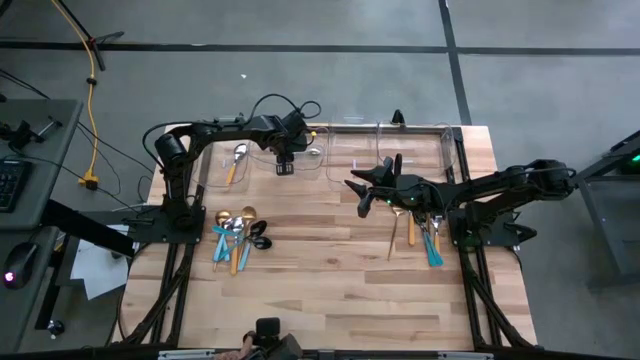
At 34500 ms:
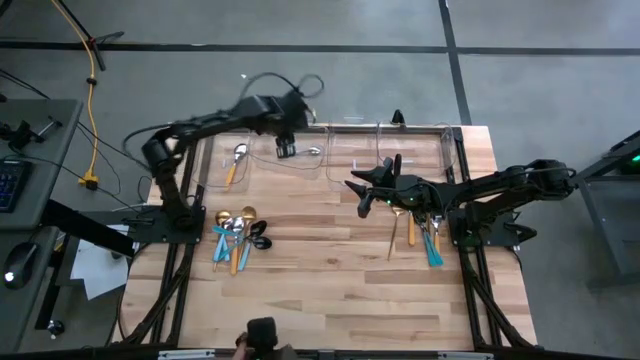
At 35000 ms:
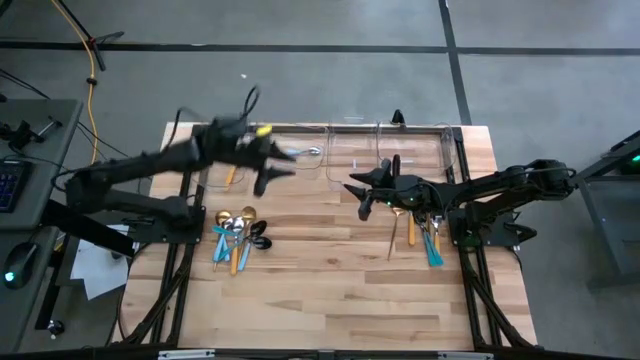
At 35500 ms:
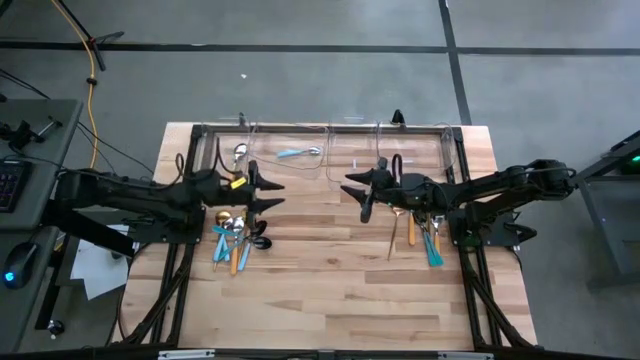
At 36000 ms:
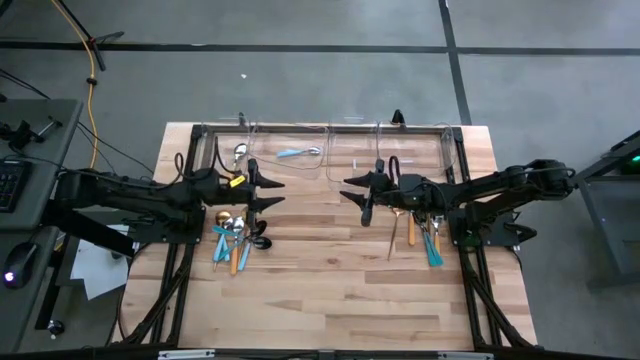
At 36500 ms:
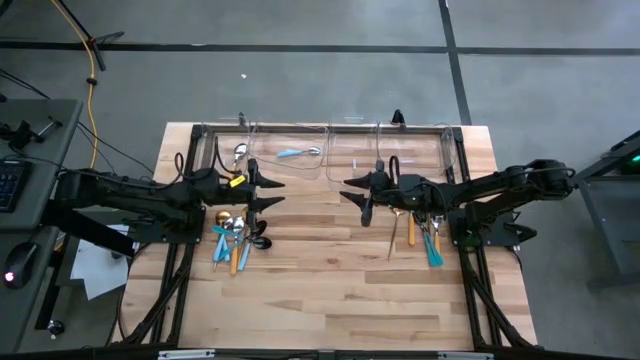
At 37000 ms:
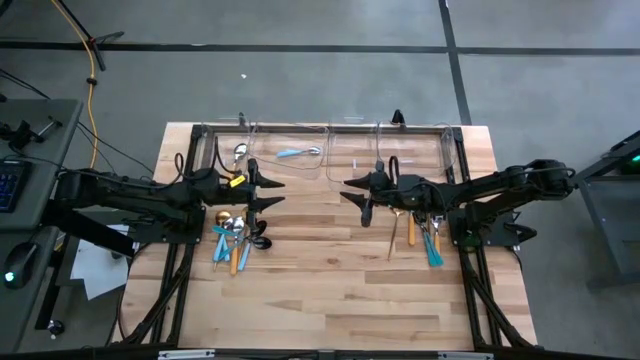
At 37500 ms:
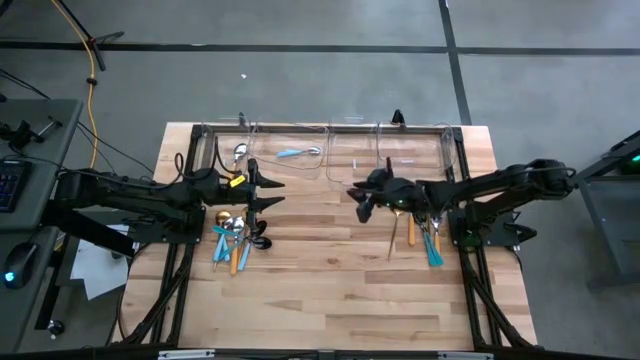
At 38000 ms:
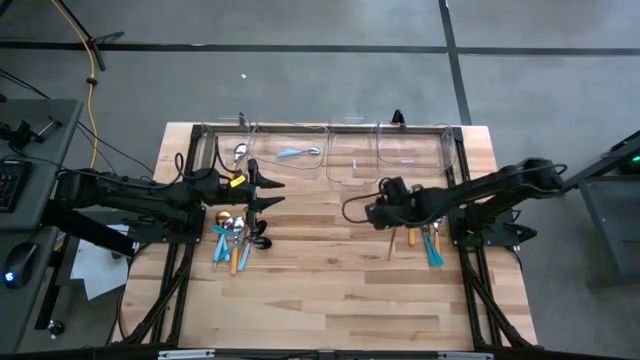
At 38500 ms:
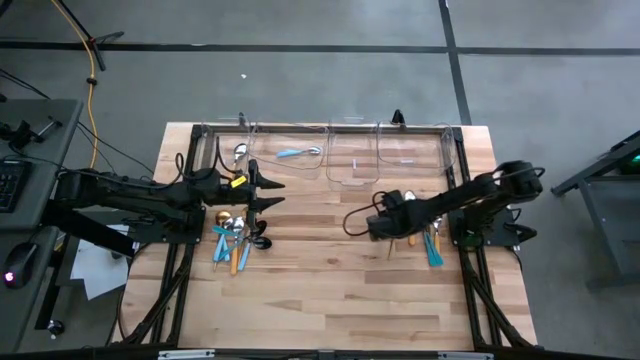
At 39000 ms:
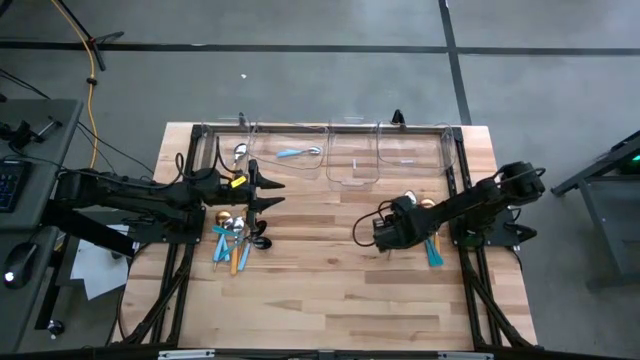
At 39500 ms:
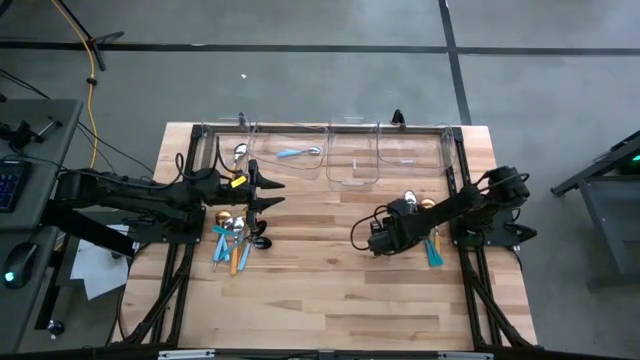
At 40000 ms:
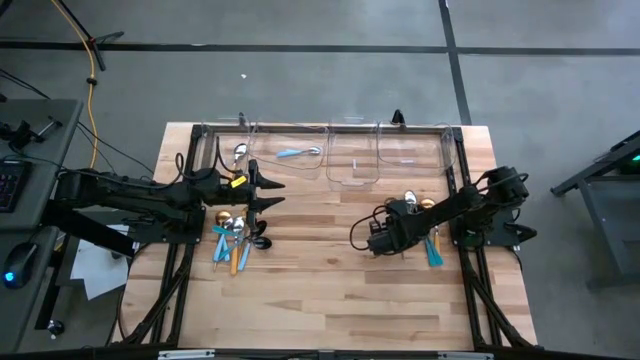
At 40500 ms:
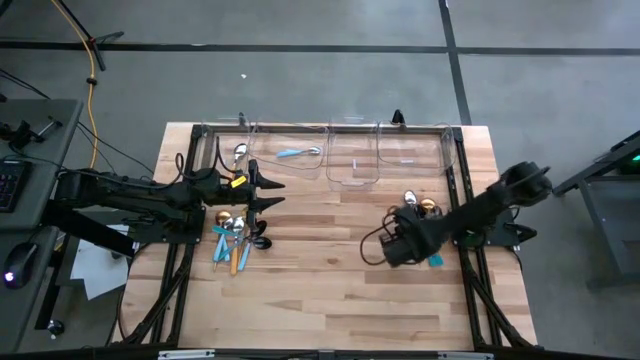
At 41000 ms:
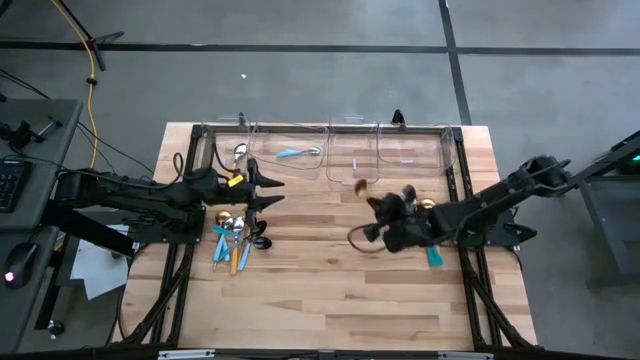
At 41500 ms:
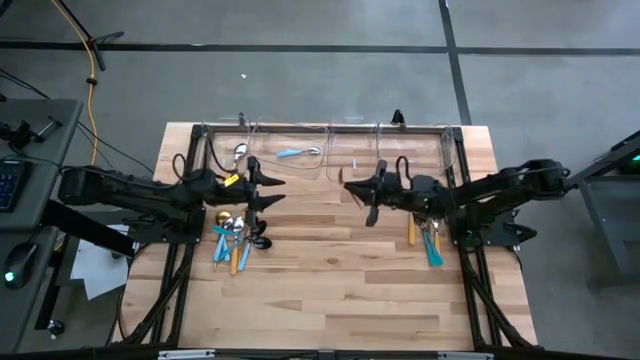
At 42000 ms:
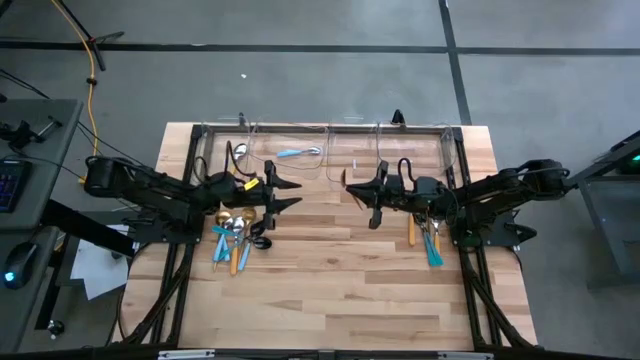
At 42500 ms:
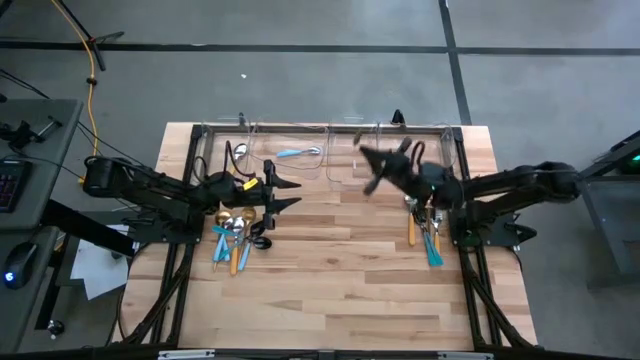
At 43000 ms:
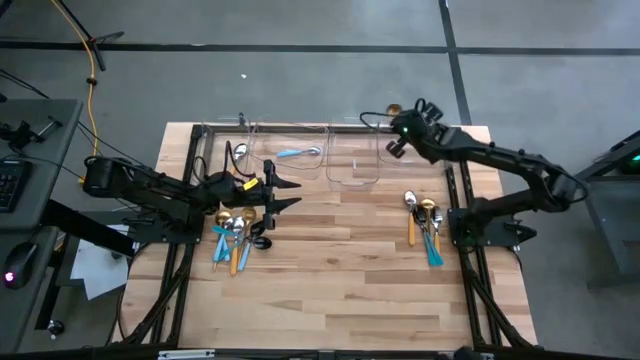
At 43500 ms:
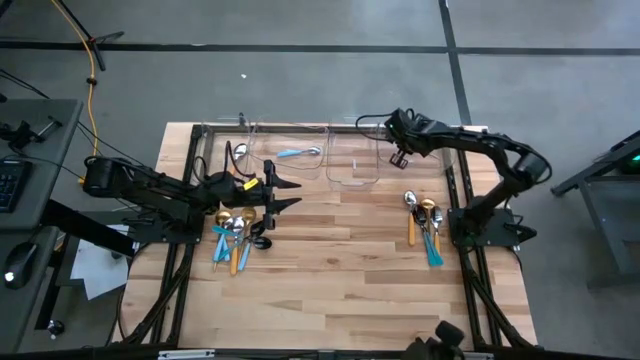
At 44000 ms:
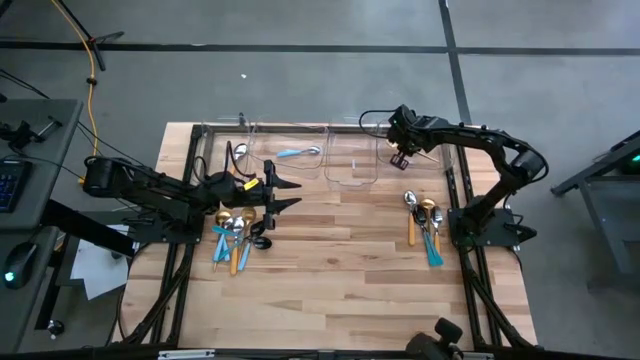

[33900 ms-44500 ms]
Task: Sort silverware by color (type)
Put the gold spoon into the right transparent bin

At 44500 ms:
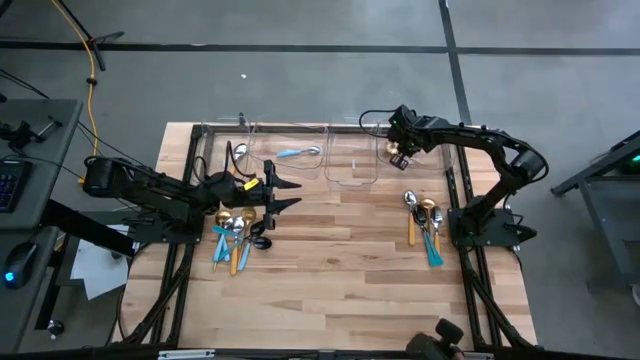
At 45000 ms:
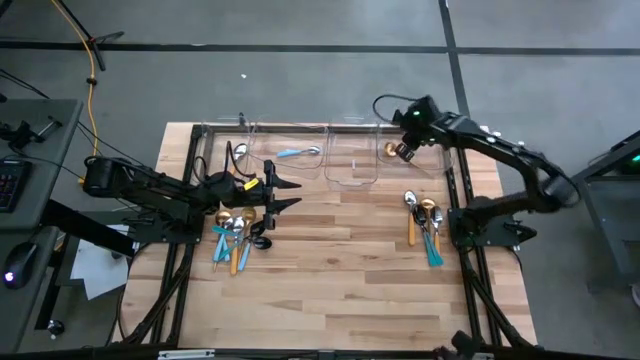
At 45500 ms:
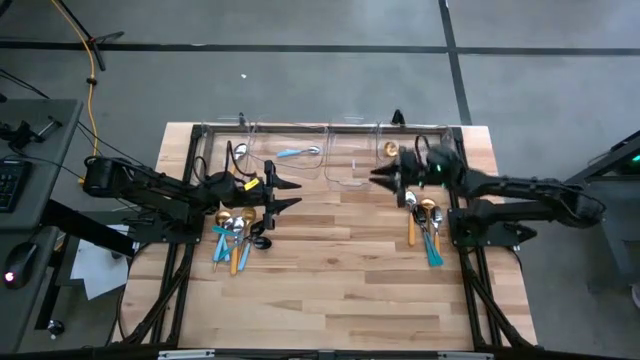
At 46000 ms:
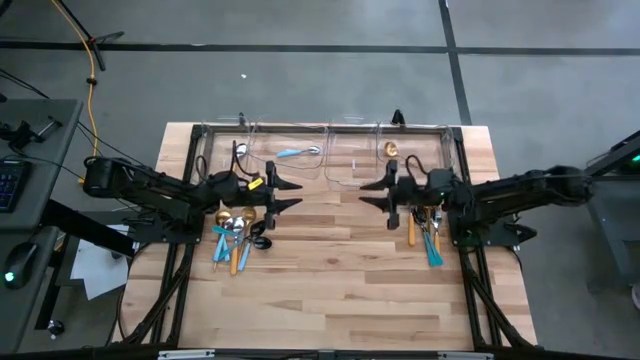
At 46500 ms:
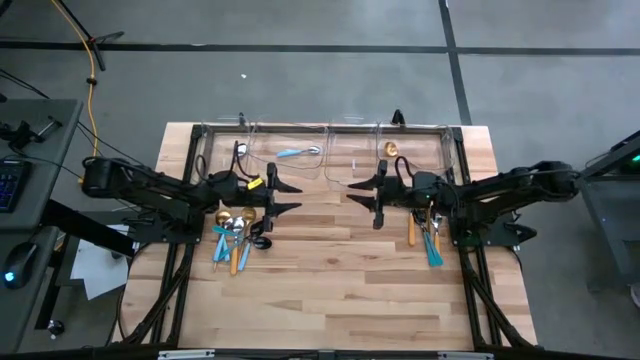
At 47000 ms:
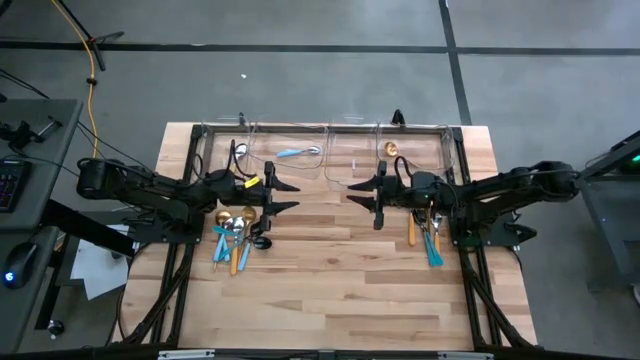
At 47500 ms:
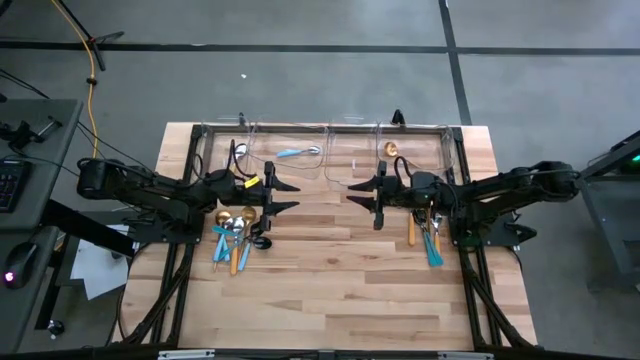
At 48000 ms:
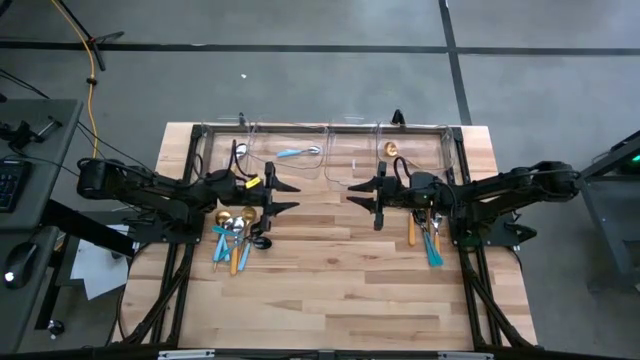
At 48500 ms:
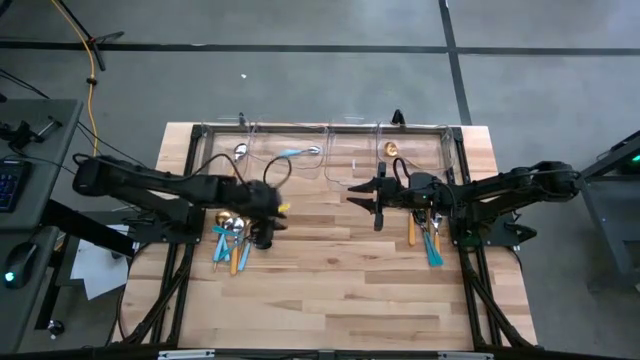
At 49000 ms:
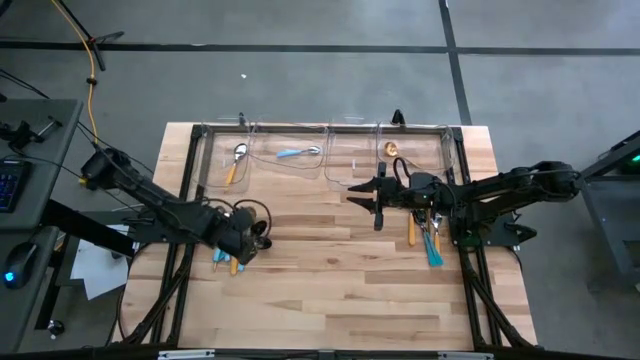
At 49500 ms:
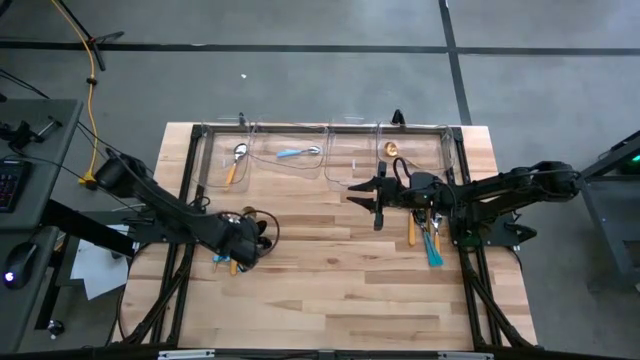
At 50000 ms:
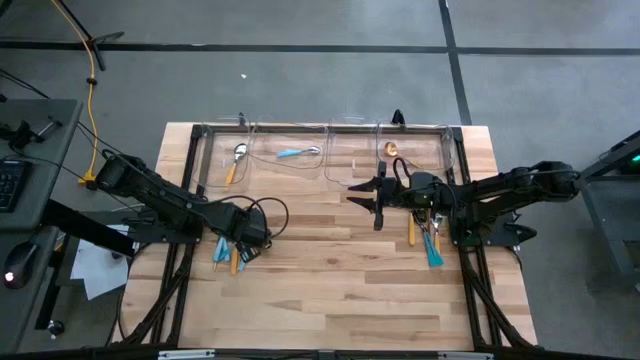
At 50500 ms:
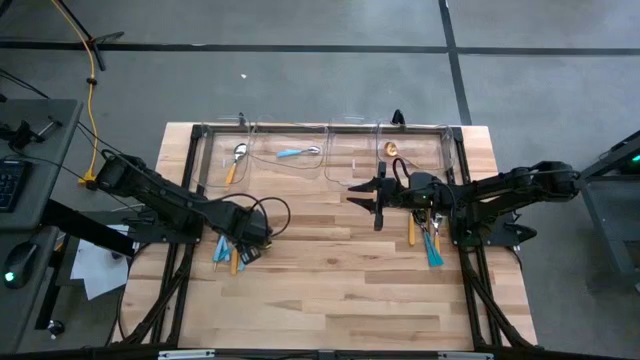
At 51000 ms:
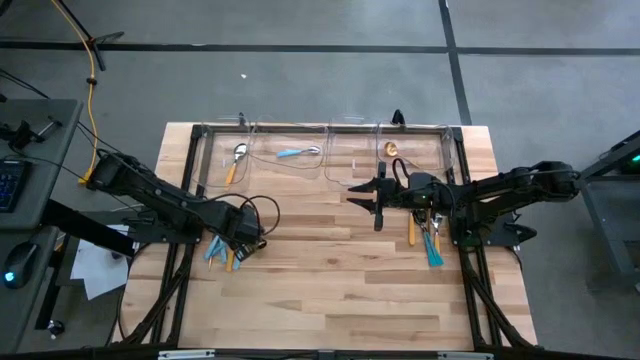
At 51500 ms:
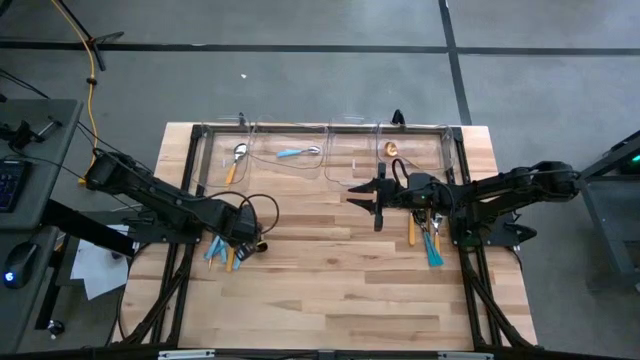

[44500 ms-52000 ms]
Put the black spoon into the middle right transparent bin

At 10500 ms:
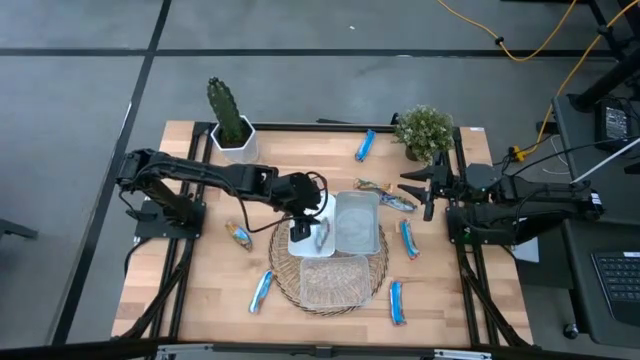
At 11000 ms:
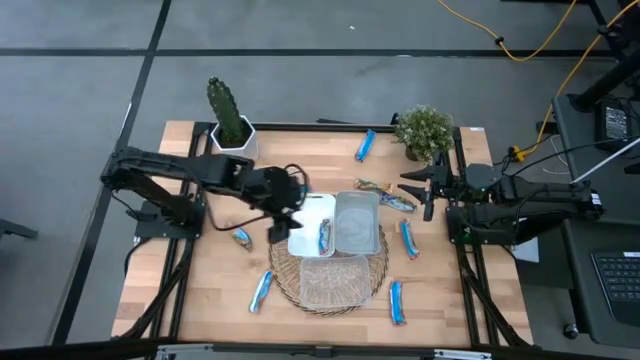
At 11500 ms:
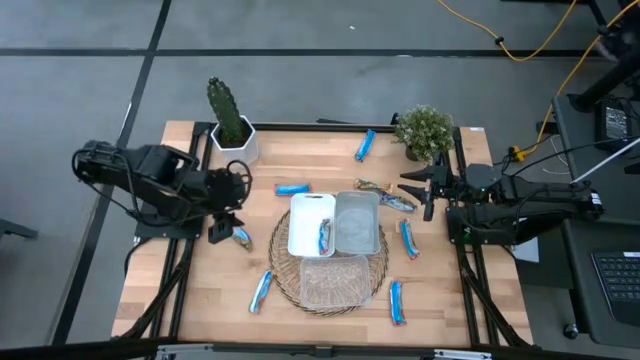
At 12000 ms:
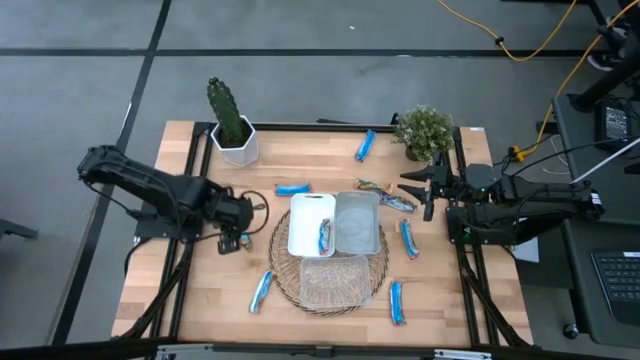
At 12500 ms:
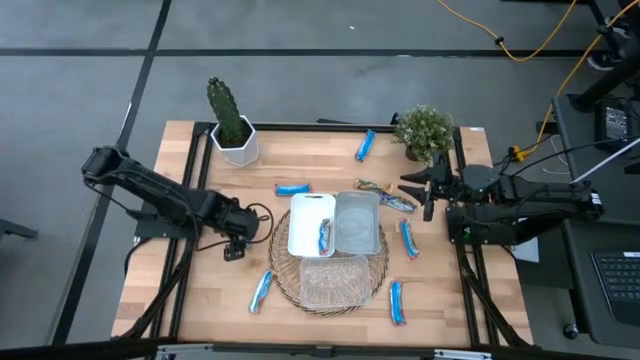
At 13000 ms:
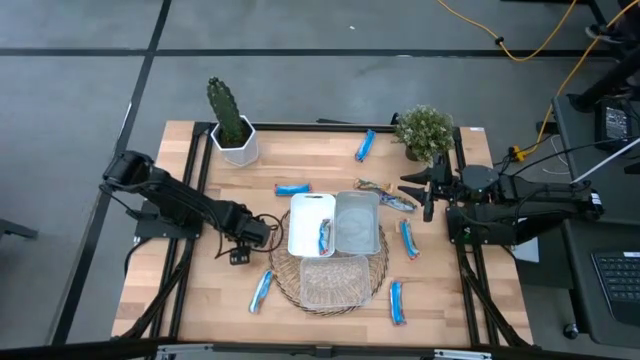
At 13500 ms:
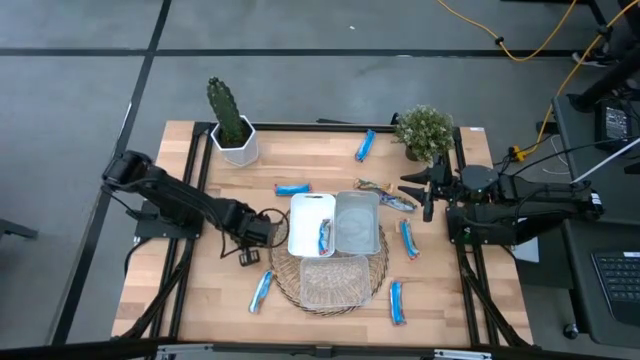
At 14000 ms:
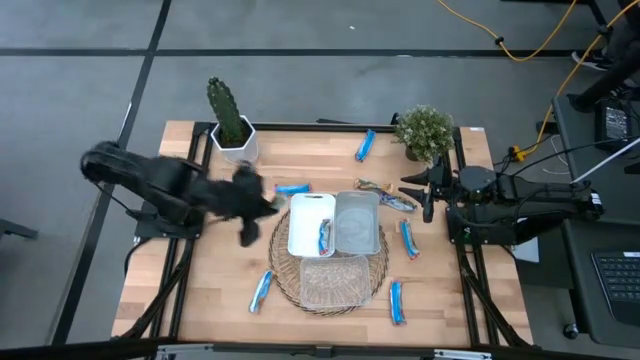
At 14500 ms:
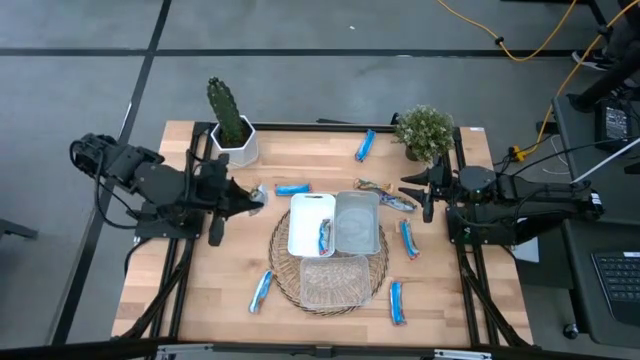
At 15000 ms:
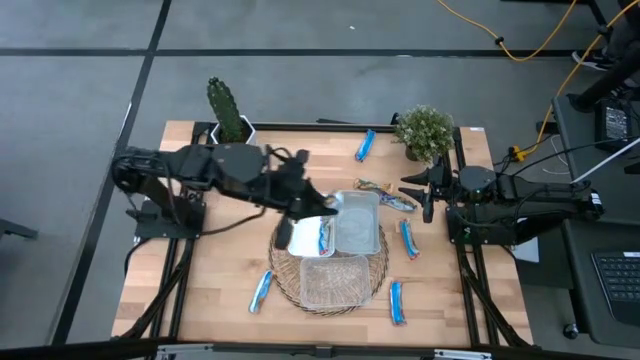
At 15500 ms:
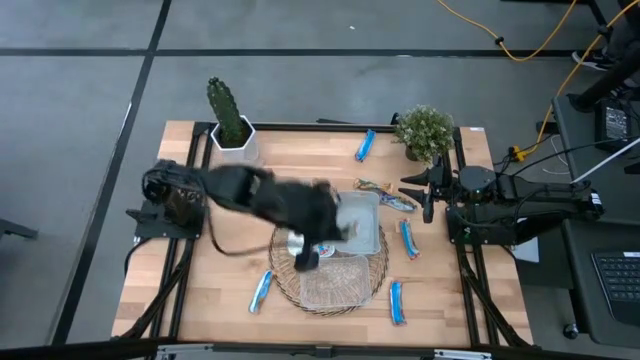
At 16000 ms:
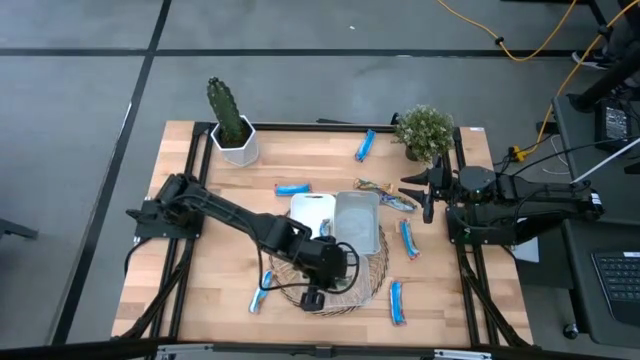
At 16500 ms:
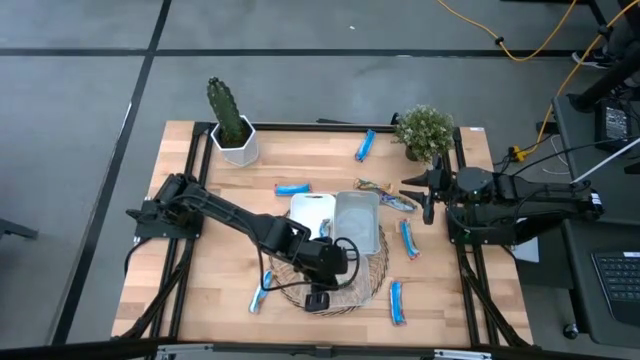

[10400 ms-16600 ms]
Task: Pick and place Granola Bars by type
Put the orange granola bar into the transparent bin
